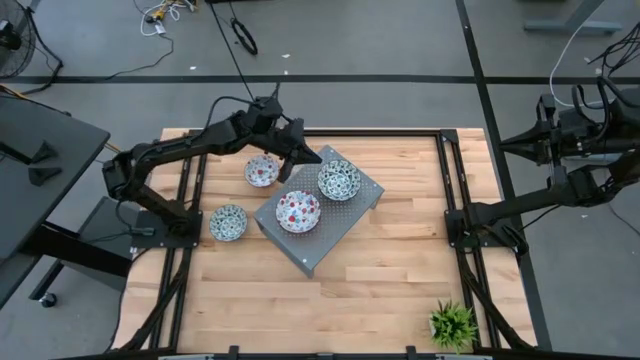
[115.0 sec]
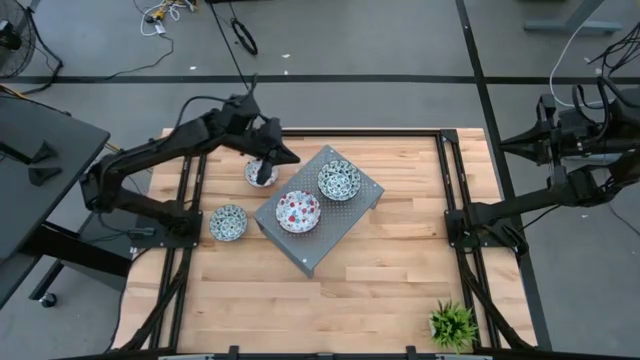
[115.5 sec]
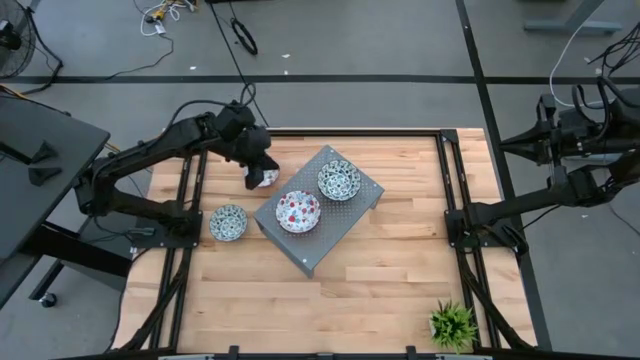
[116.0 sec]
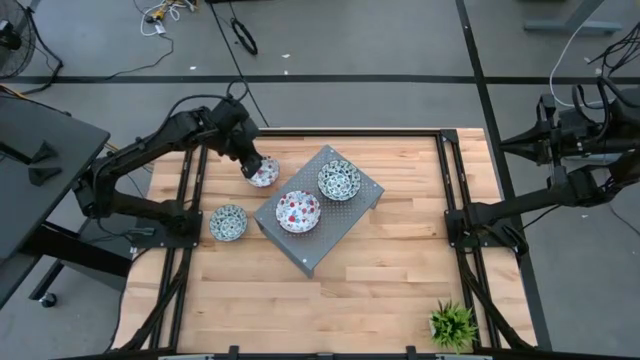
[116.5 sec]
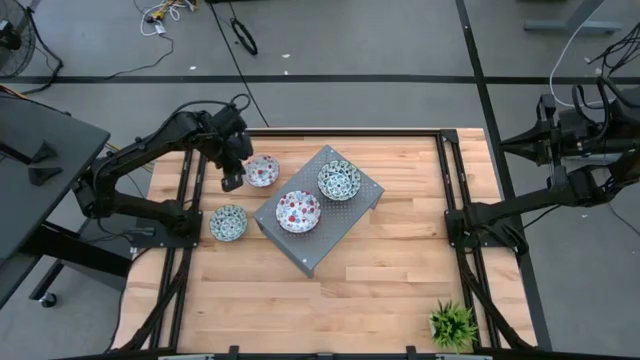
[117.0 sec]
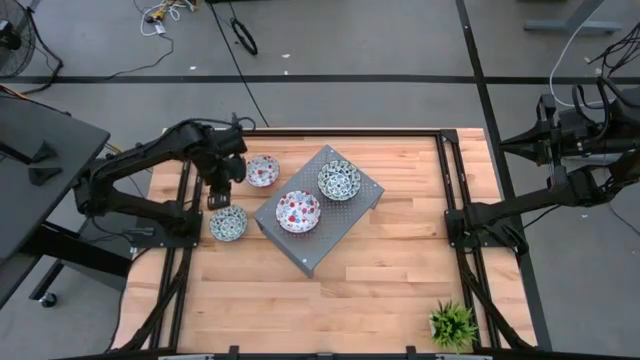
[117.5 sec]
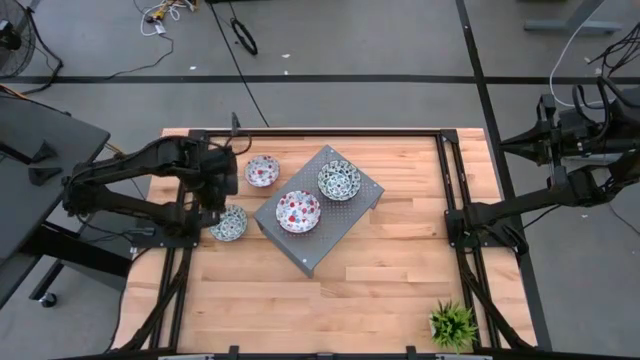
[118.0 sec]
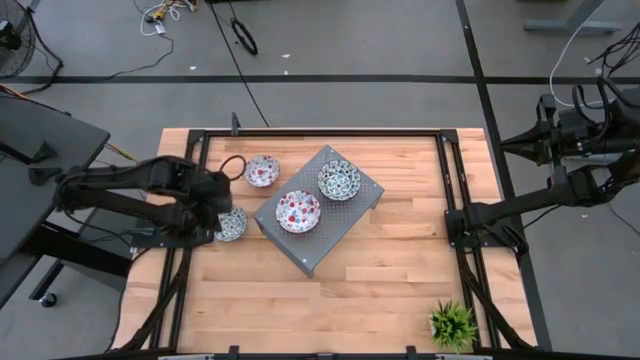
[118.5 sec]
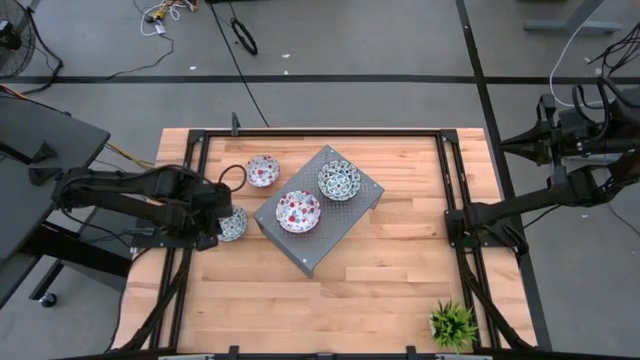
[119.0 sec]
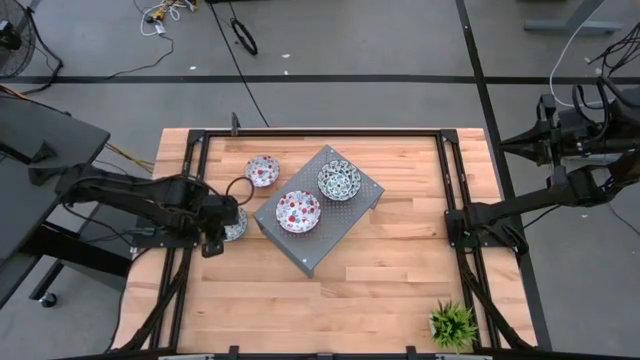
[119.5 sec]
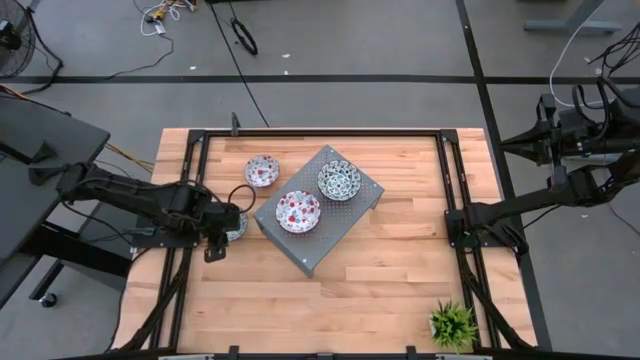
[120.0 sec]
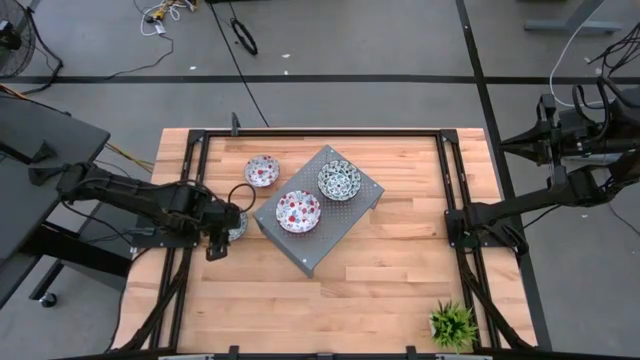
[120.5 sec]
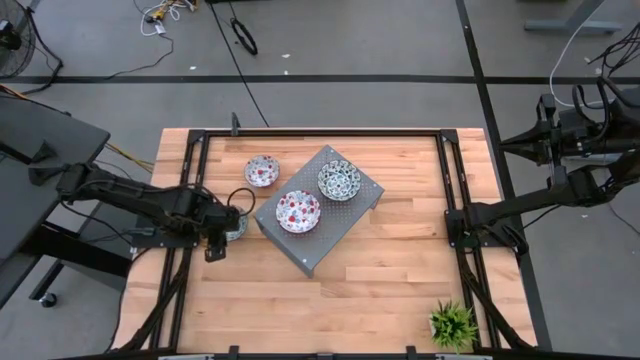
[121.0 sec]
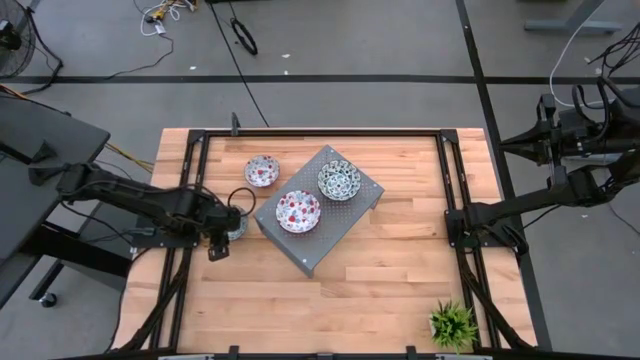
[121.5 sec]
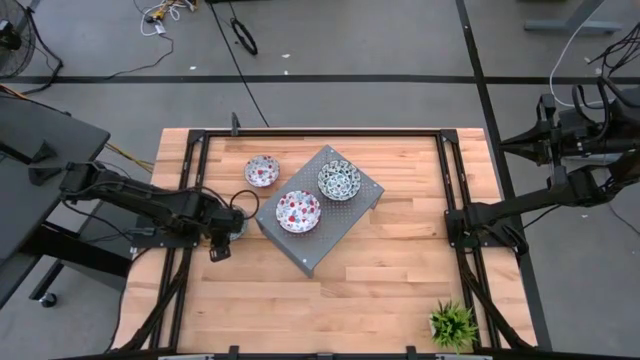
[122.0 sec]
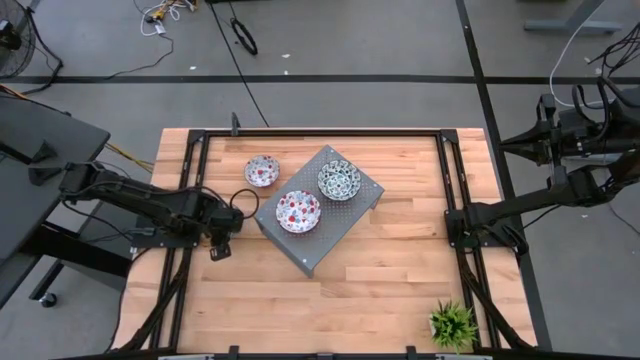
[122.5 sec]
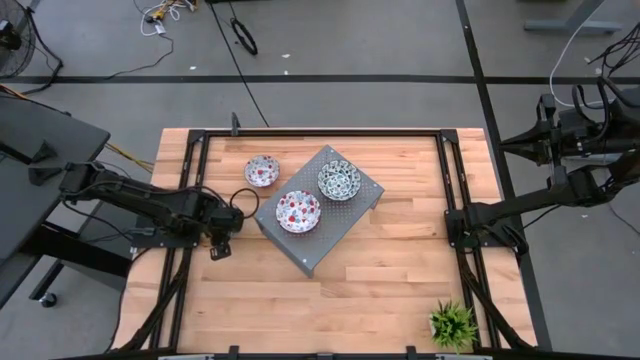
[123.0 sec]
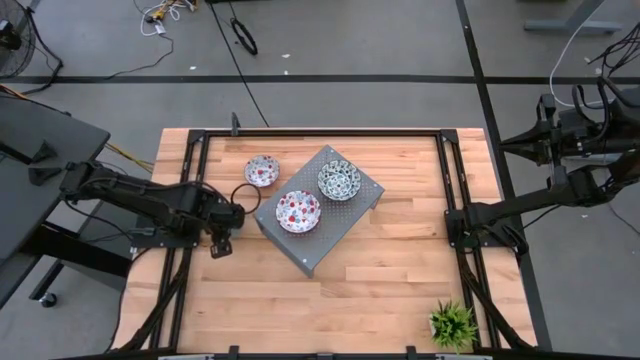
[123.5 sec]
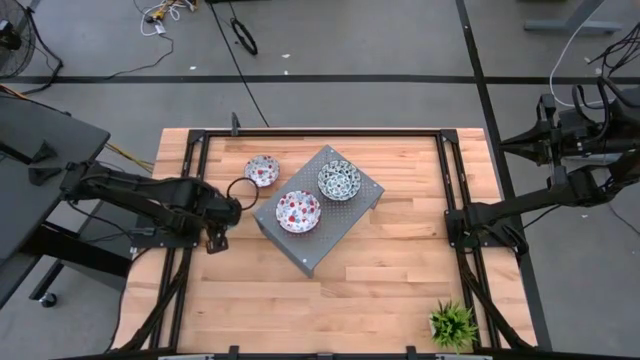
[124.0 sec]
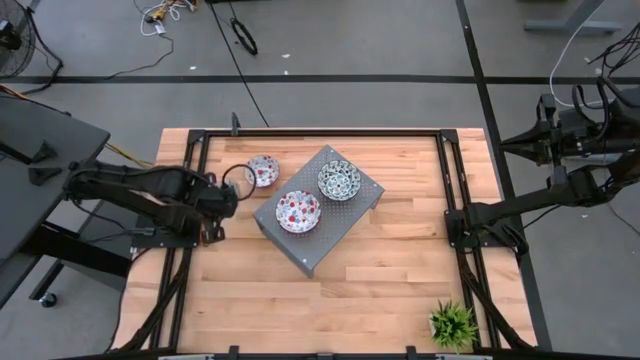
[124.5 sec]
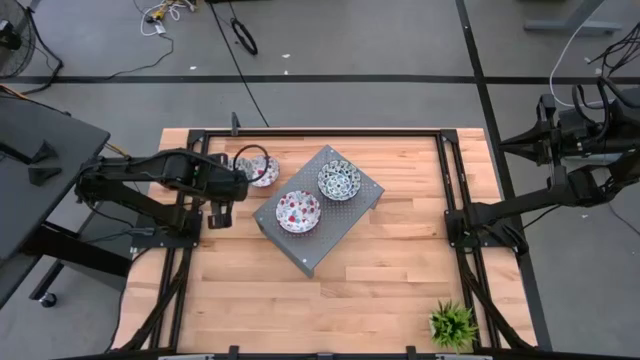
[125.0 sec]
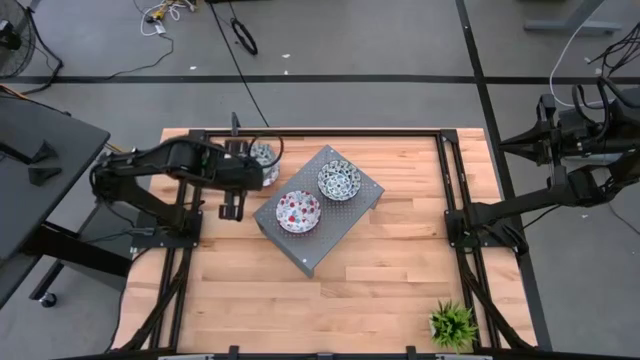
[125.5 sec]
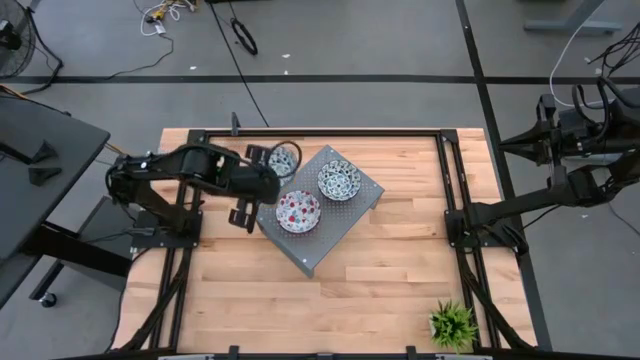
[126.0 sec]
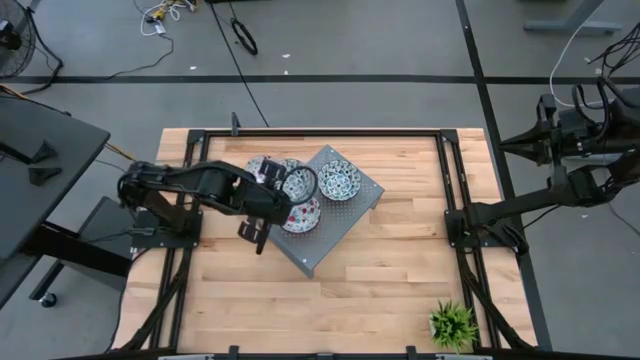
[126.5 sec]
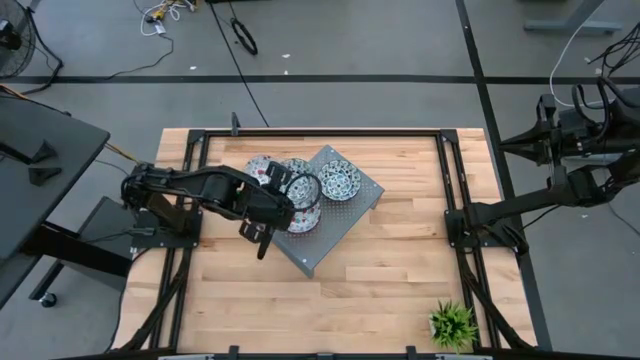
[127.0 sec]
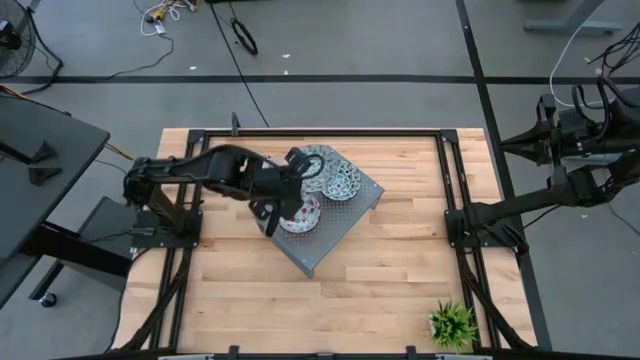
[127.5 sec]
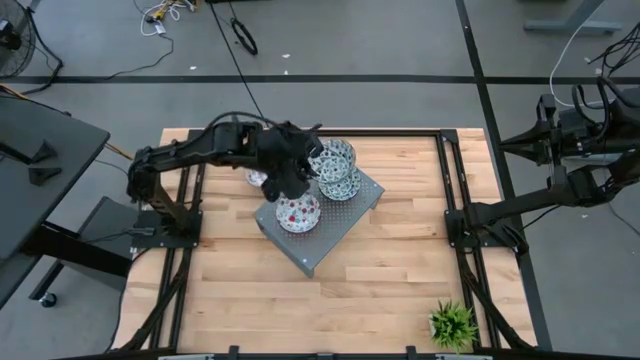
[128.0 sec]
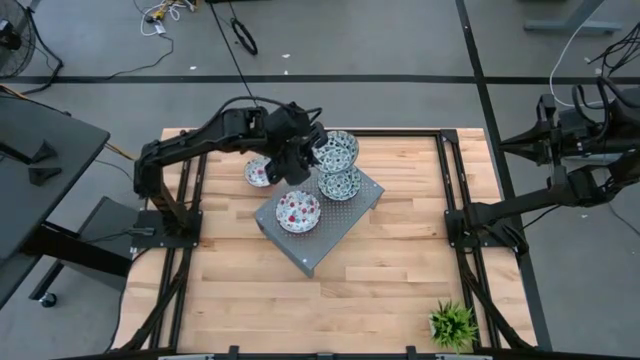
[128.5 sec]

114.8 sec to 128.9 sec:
Task: Pick & Place Mini bowls
Stack the blue patterned bowl on top of the blue patterned bowls on the shelf

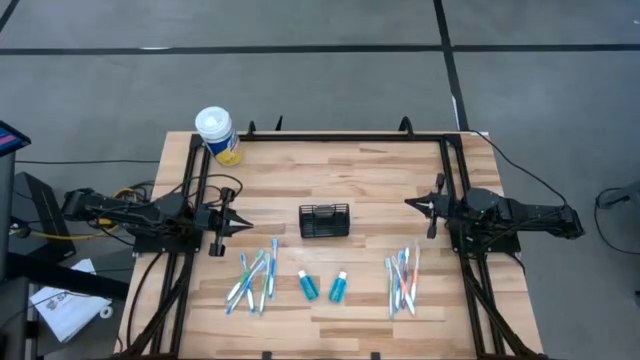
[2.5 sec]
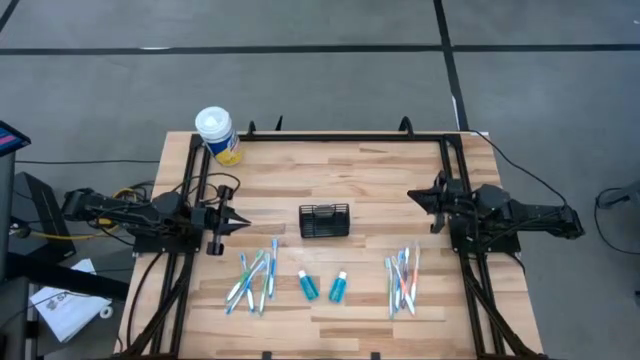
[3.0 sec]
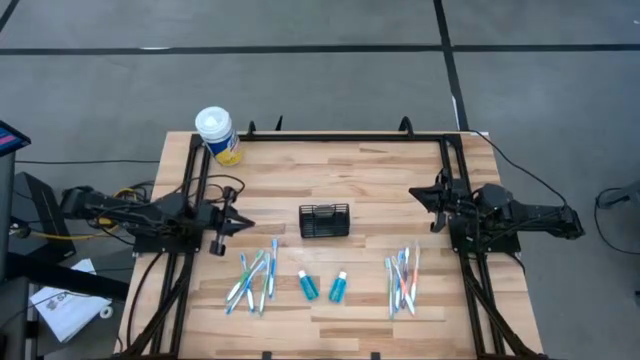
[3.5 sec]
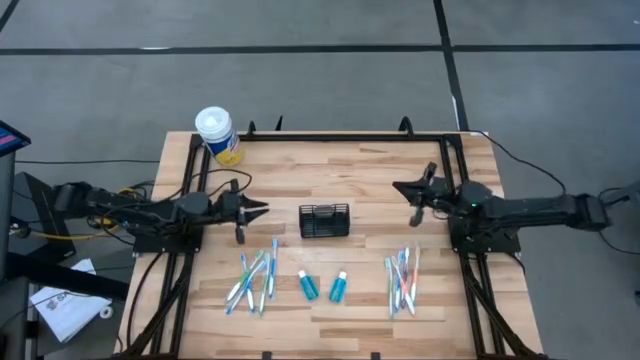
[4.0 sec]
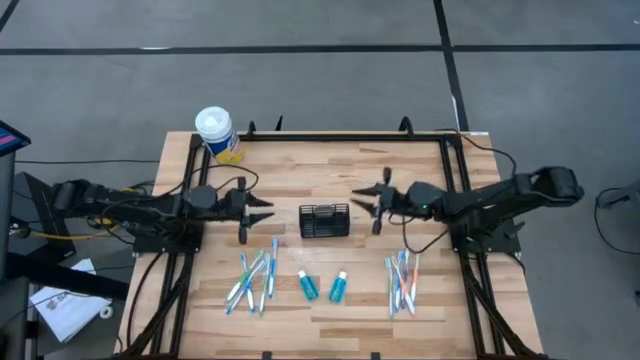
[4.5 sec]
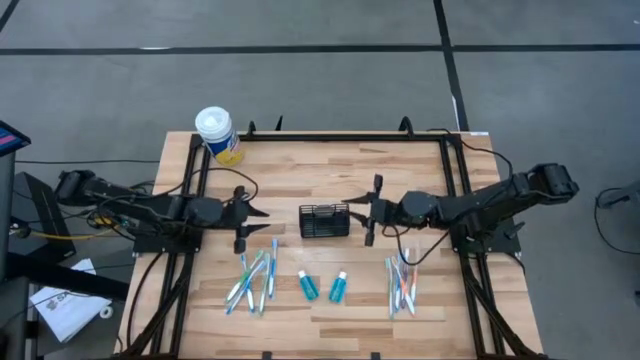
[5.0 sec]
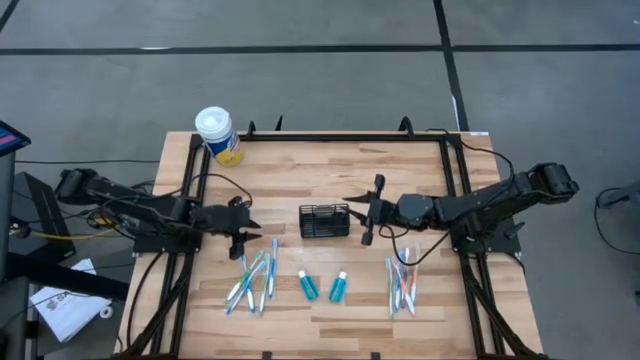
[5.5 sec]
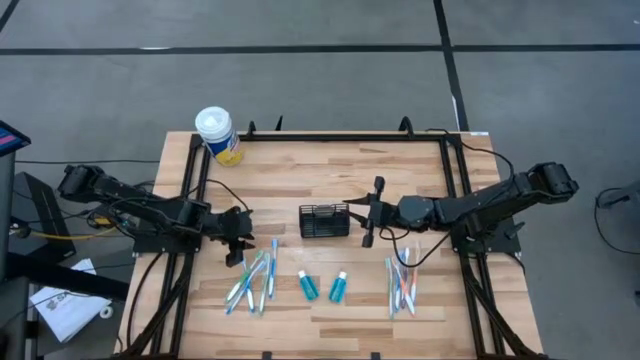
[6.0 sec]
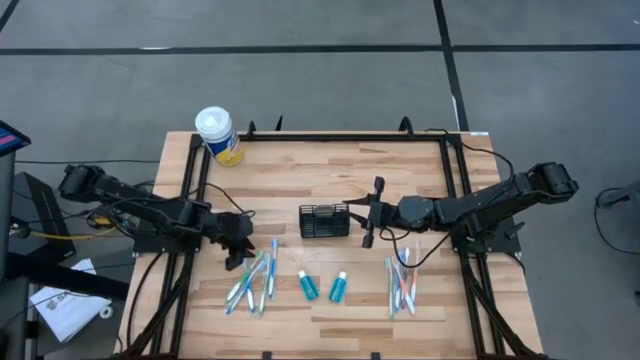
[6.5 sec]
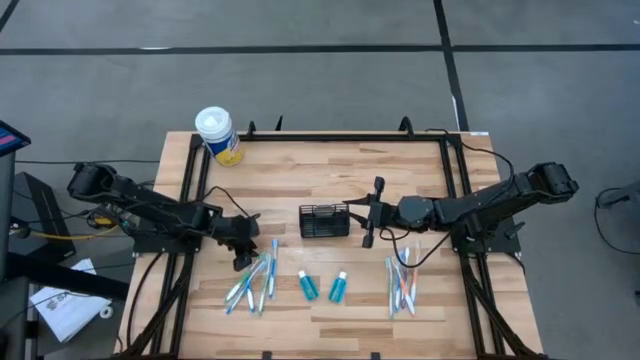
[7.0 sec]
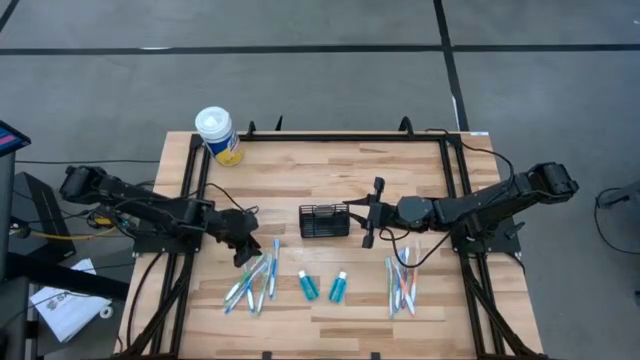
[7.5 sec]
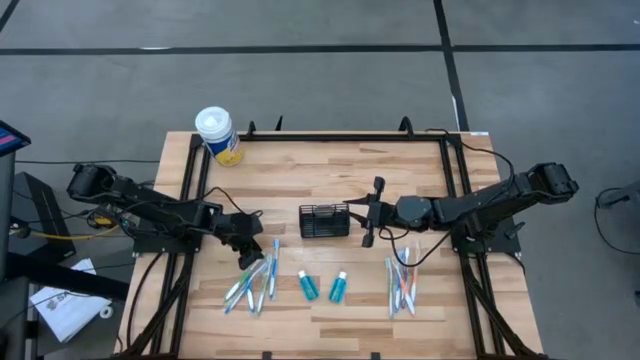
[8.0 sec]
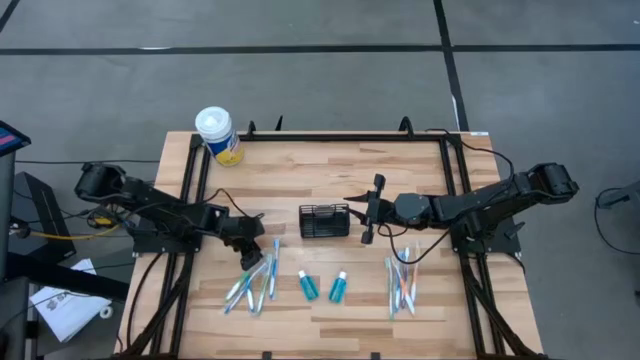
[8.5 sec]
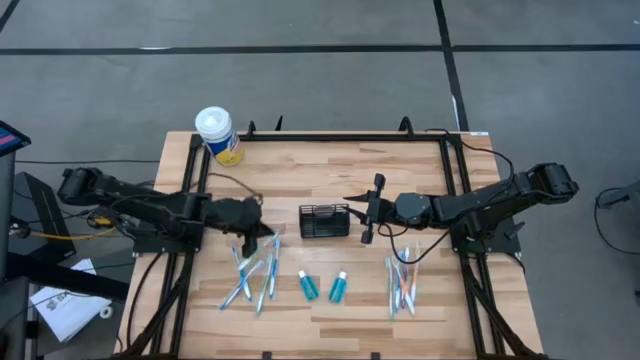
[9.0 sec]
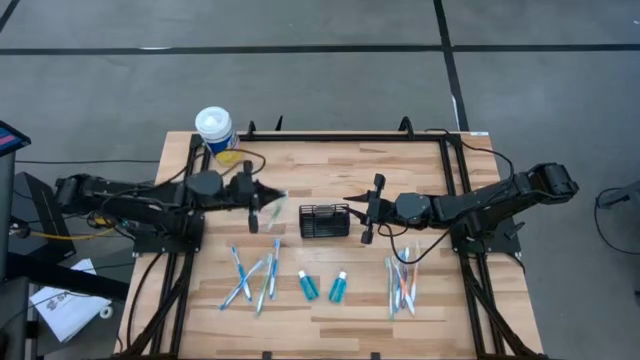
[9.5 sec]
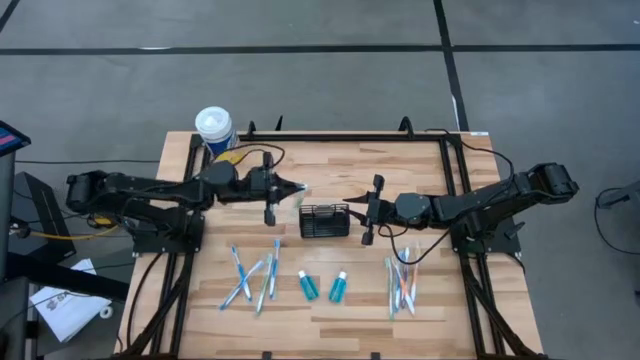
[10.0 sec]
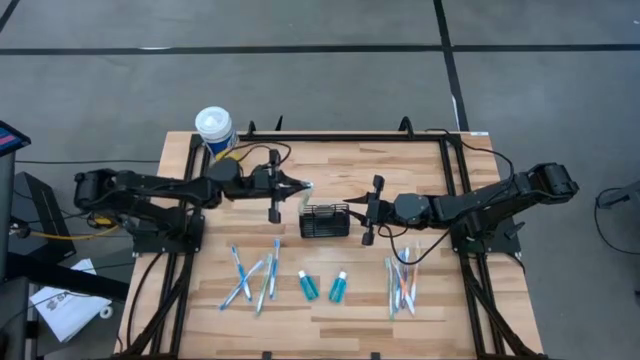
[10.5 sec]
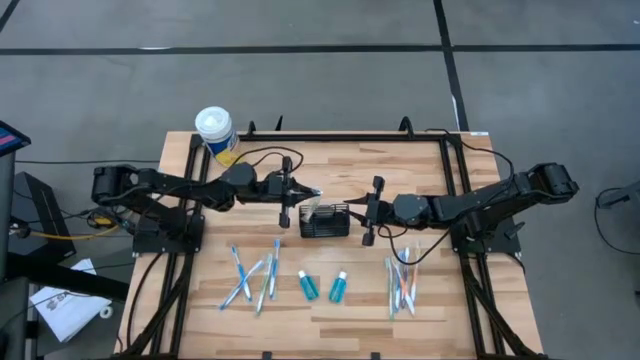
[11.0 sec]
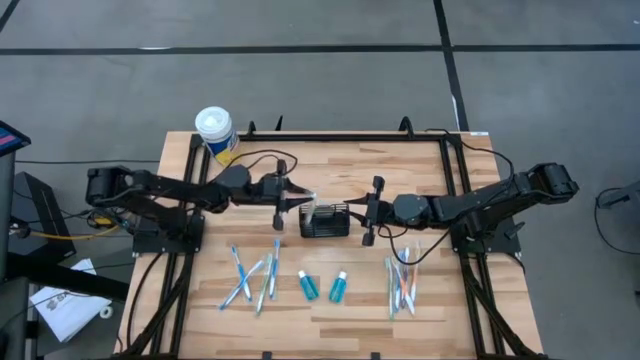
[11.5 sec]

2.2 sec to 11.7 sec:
Task: Pick & Place toothbrushing station
Put the green toothbrush into the of mesh
